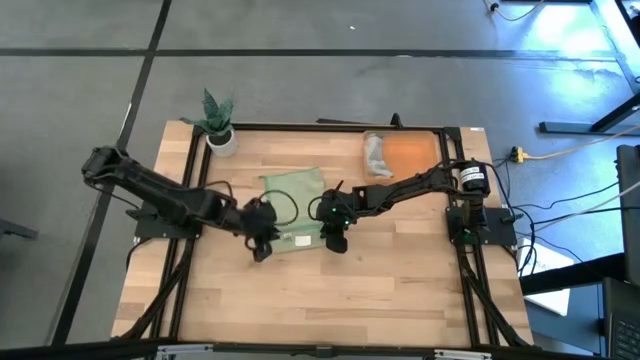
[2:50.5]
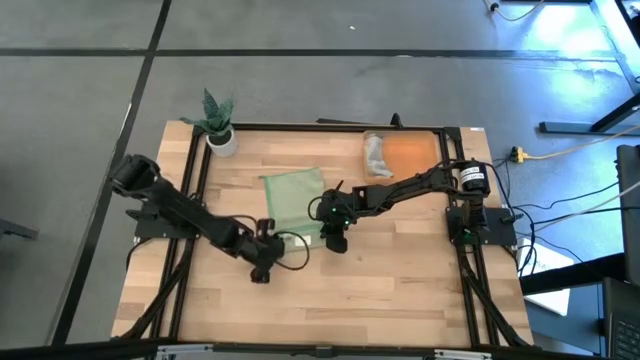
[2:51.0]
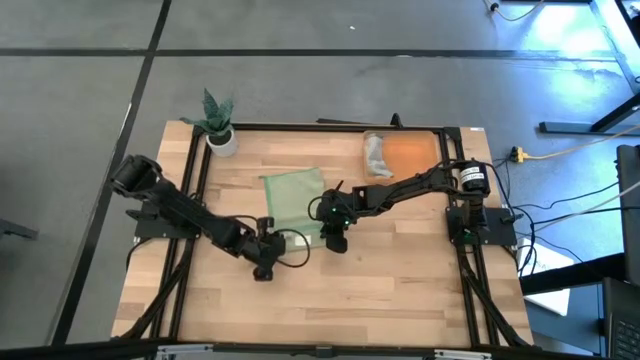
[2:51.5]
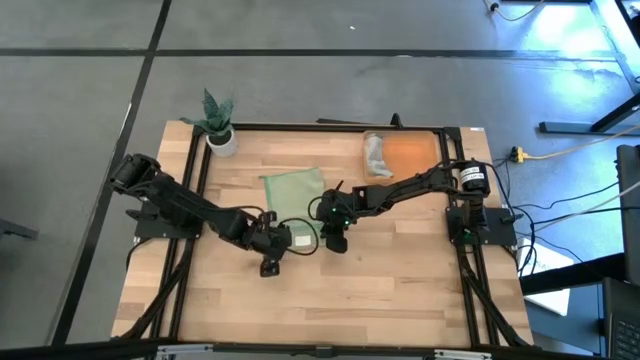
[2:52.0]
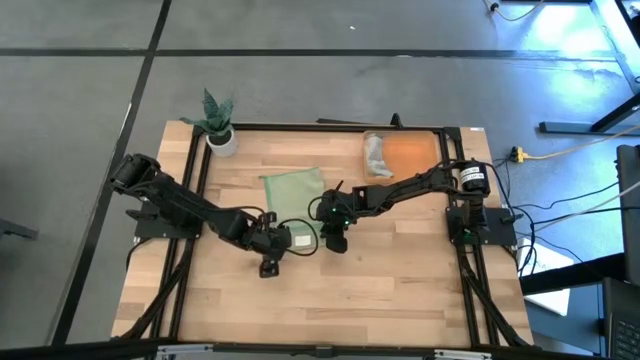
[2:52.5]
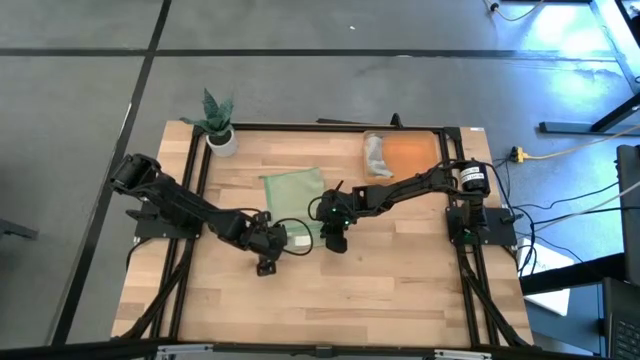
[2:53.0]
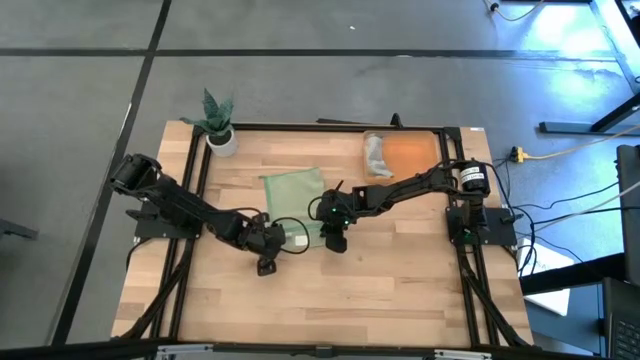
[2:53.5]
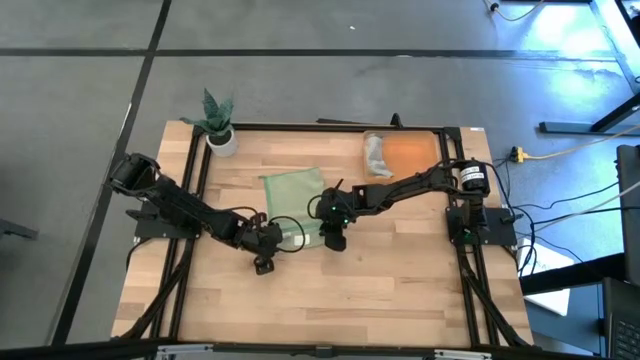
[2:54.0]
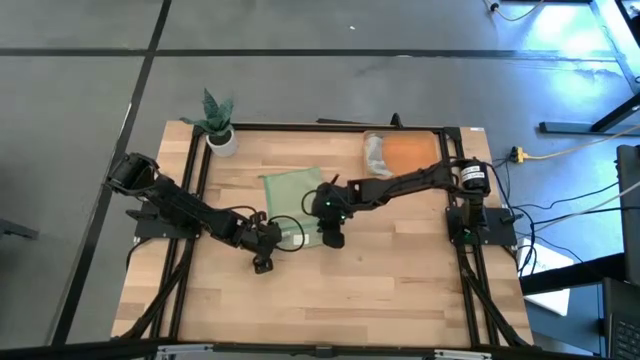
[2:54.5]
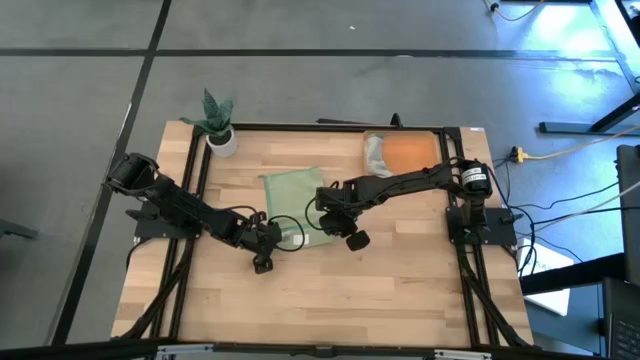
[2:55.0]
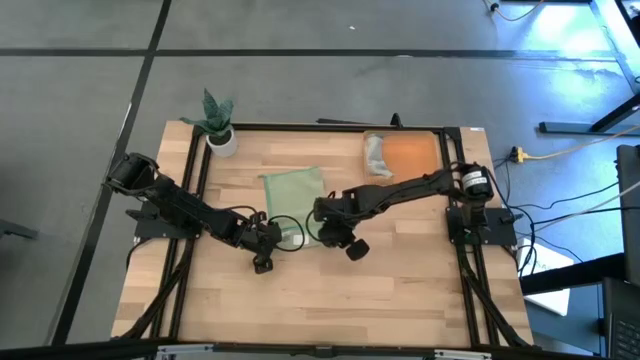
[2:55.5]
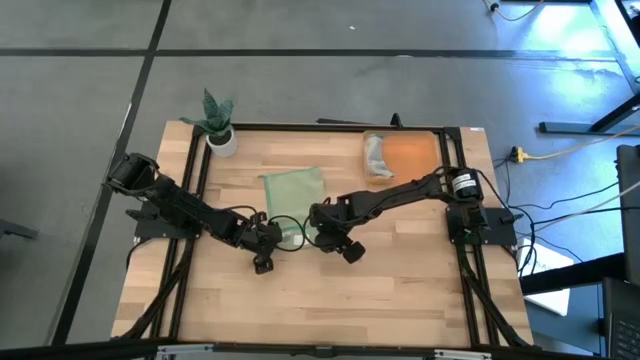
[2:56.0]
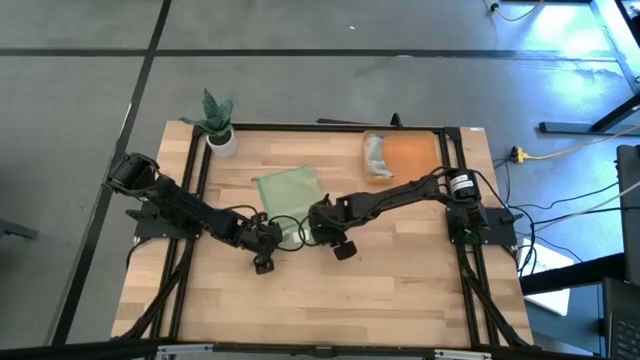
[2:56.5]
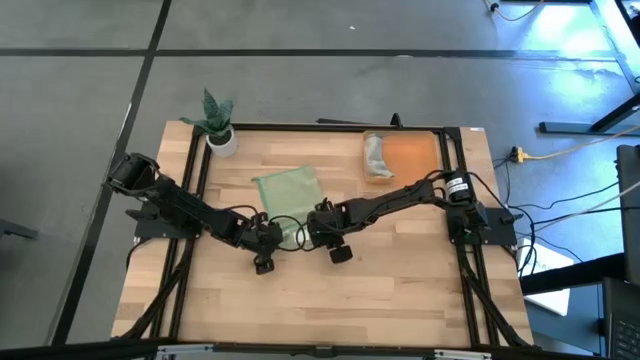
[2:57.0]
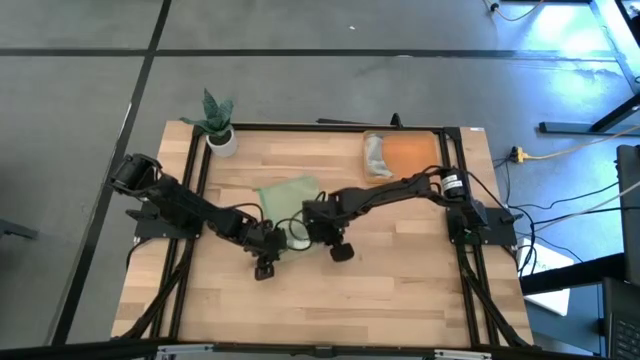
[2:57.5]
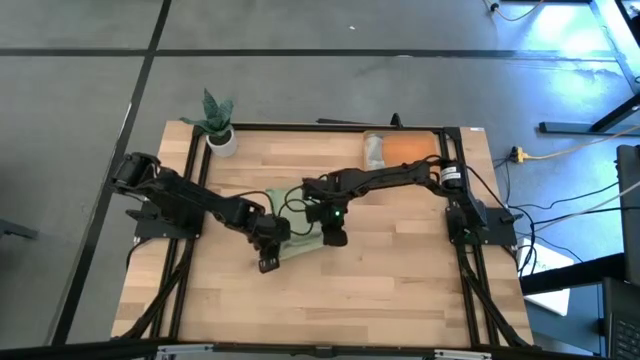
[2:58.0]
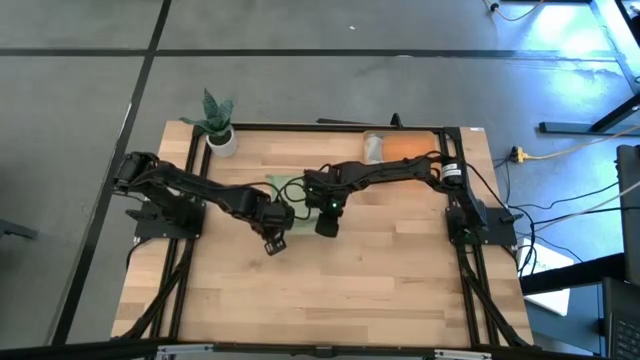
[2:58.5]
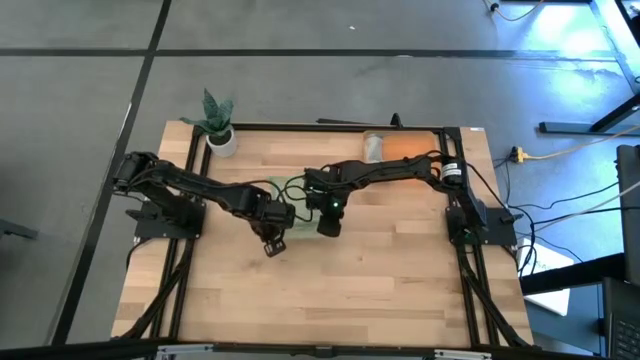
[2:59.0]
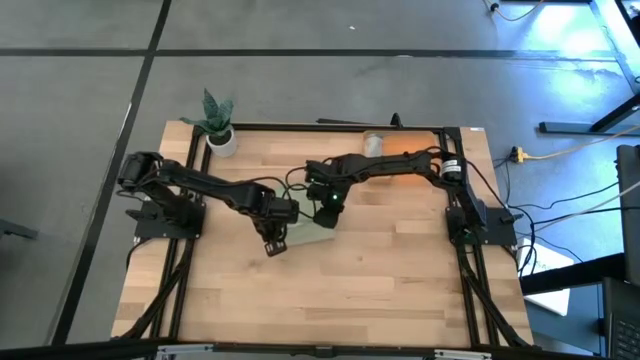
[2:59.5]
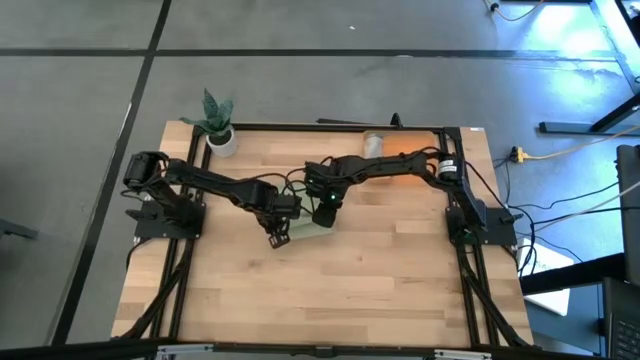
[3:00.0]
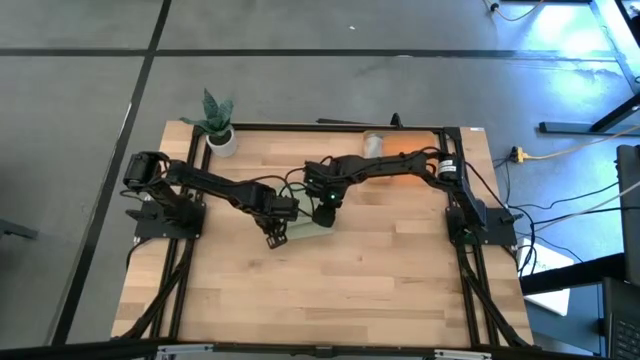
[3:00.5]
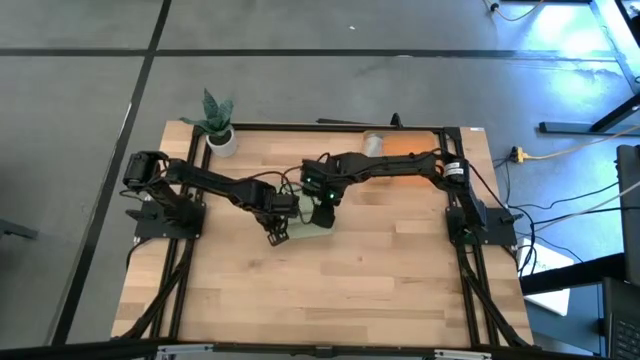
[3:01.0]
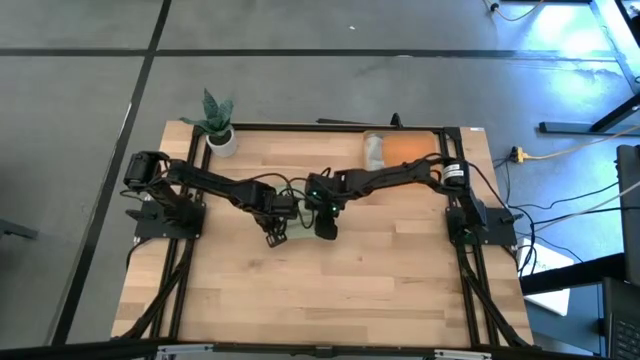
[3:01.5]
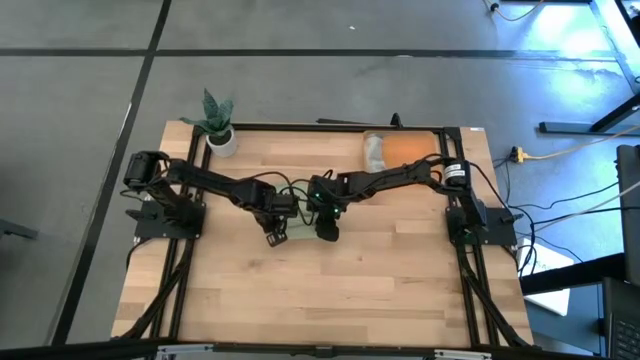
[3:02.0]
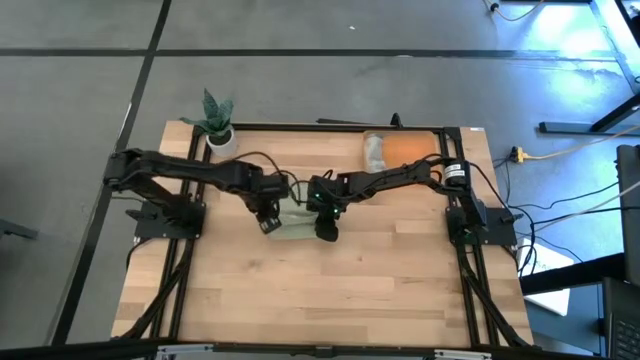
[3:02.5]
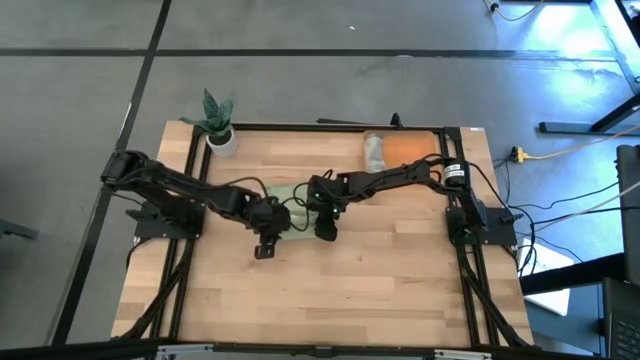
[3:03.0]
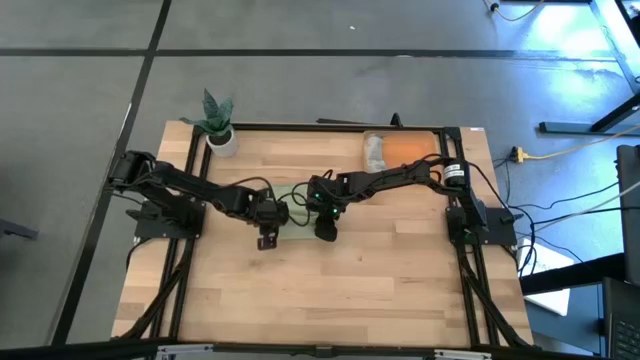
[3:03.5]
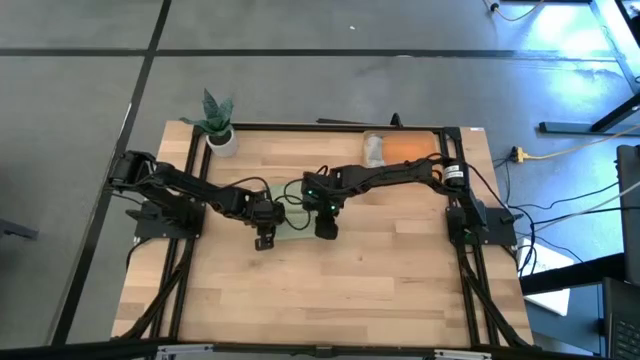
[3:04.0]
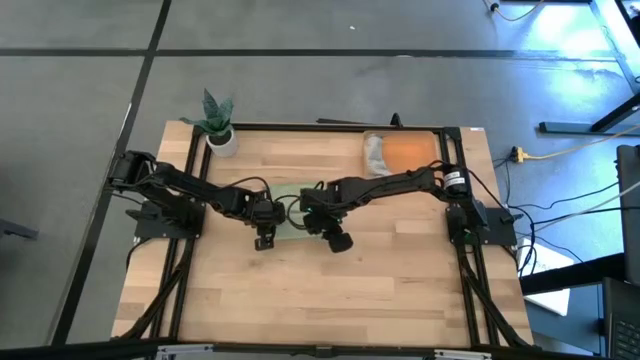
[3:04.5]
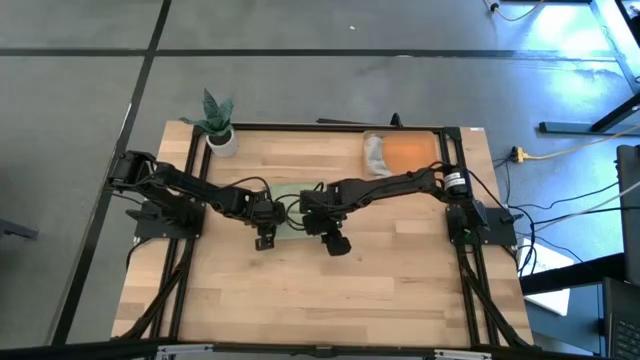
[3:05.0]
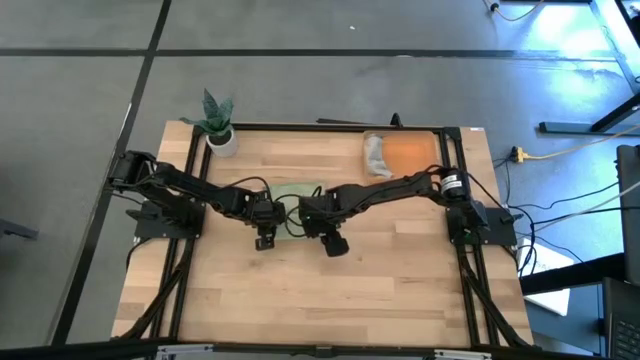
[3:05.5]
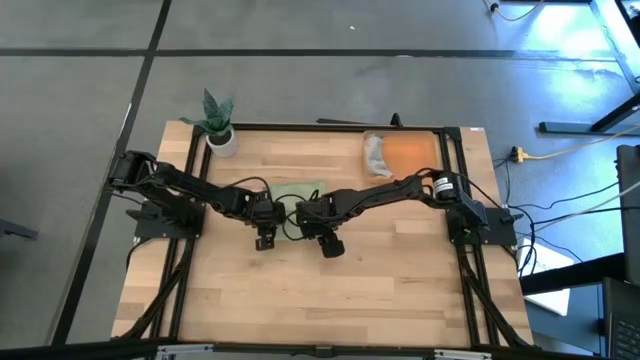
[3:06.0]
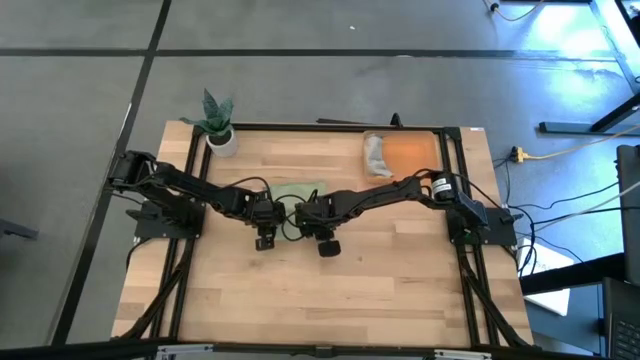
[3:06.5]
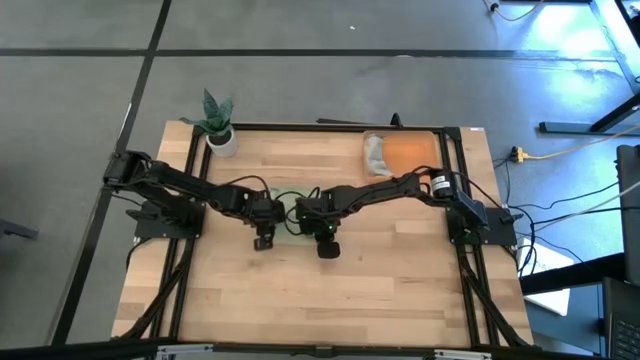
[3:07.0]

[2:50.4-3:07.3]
Task: Roll microfiber towels into tight, uniform cylinder then place into a basket
Roll the green microfiber towel

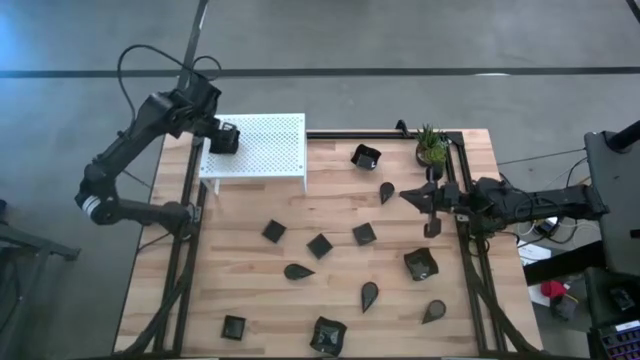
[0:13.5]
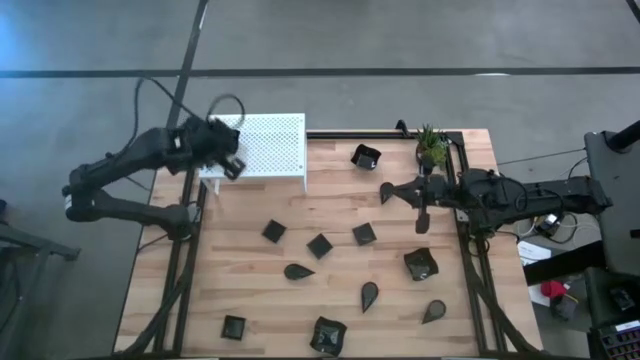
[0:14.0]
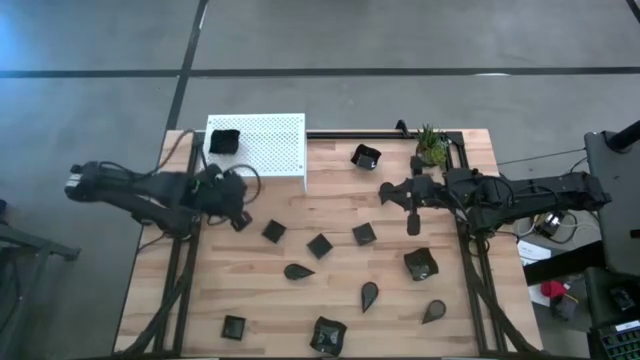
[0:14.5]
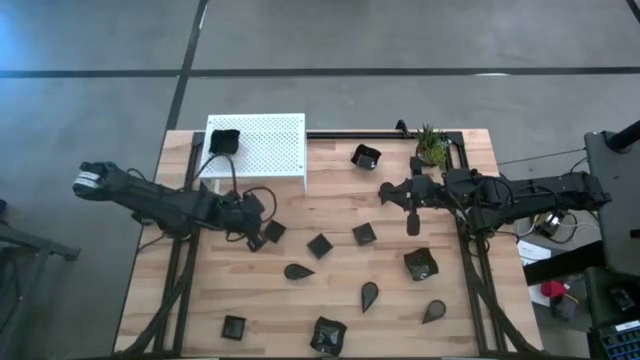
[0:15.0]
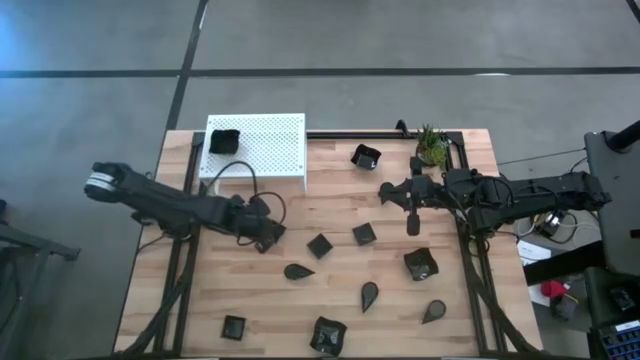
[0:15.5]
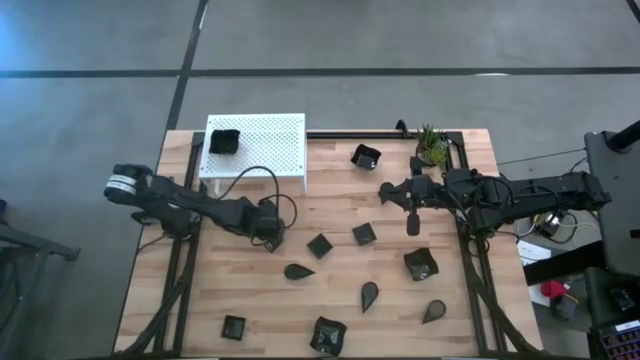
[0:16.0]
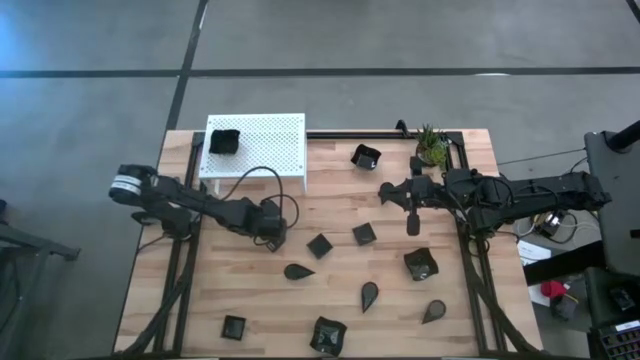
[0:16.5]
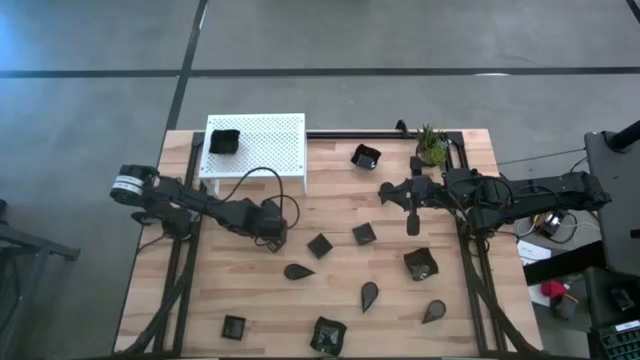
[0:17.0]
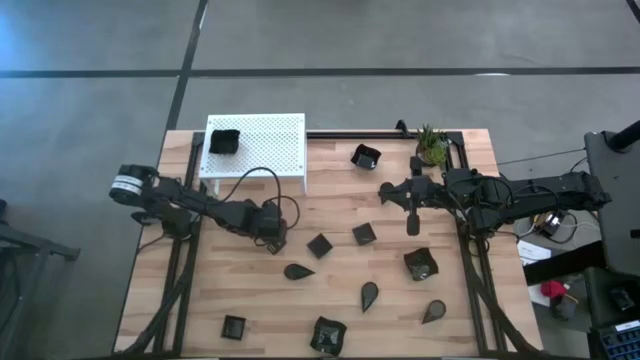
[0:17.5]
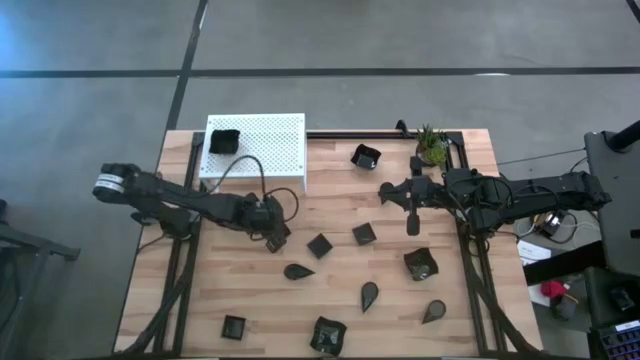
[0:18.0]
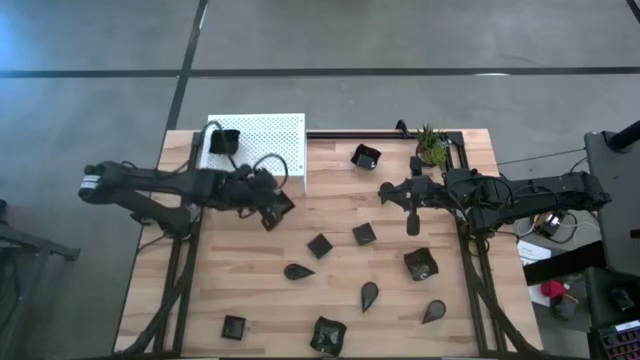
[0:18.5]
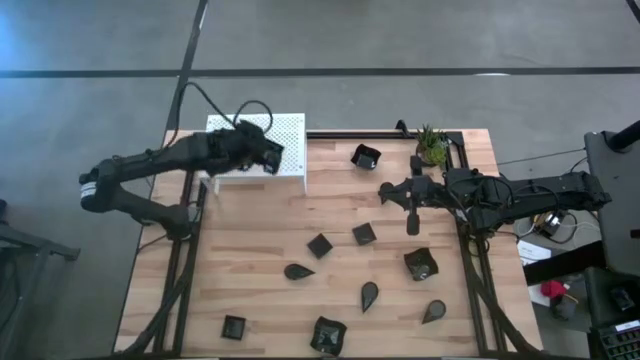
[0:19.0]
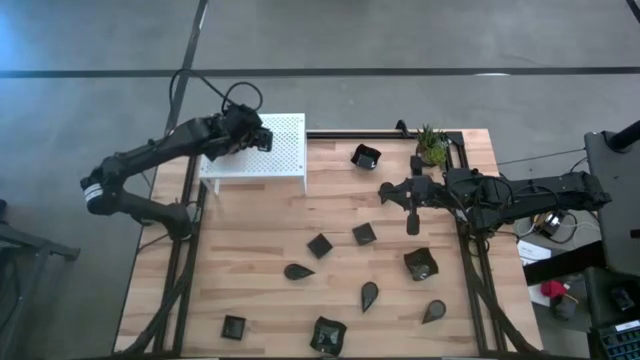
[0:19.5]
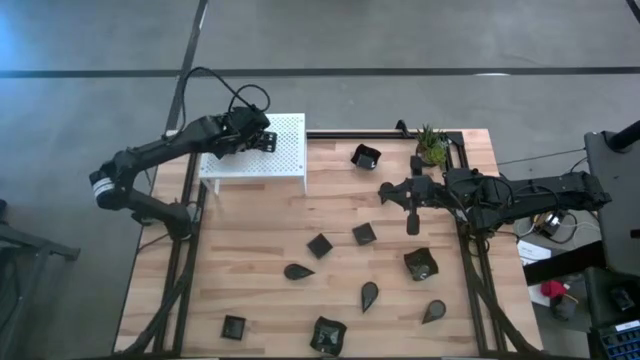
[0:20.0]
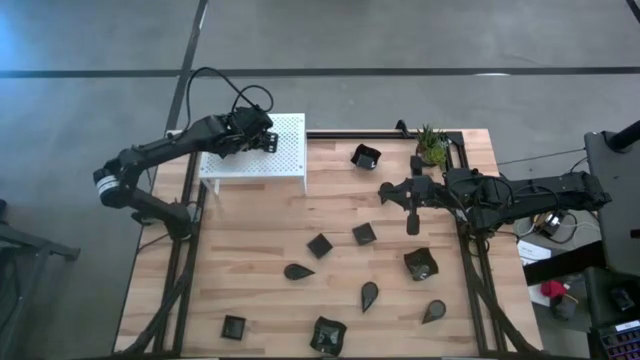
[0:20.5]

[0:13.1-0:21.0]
Task: Pick & Place Mini shaped plates
Put the square plate on the shelf
